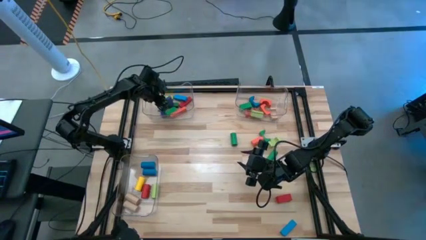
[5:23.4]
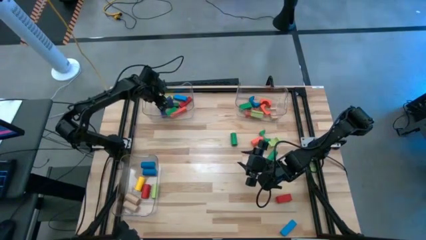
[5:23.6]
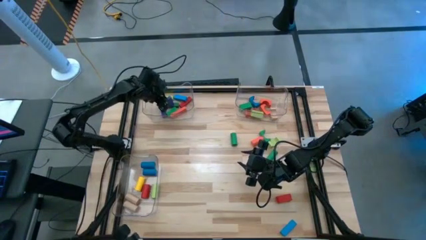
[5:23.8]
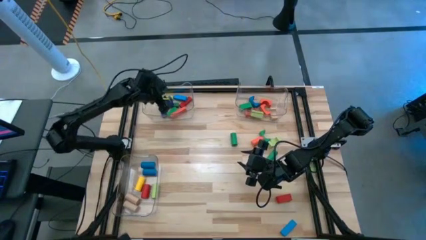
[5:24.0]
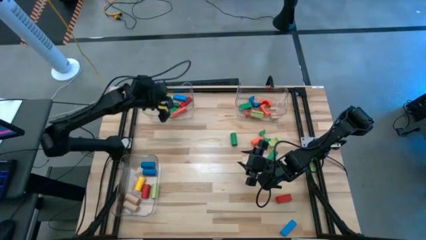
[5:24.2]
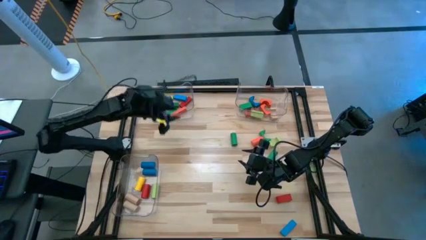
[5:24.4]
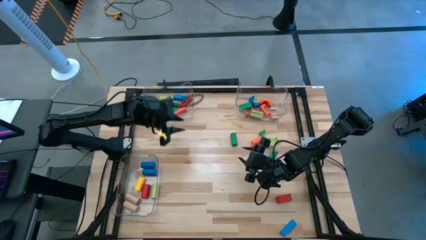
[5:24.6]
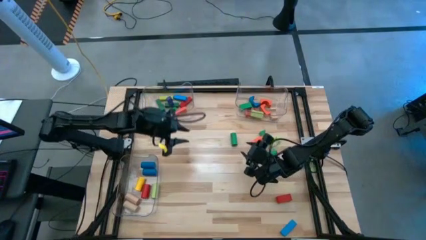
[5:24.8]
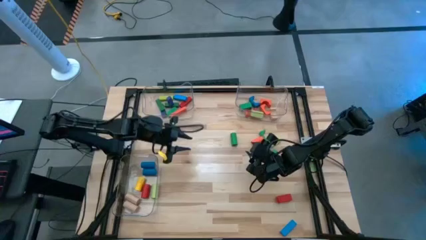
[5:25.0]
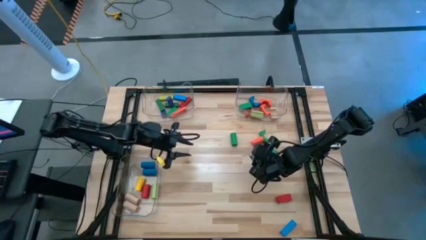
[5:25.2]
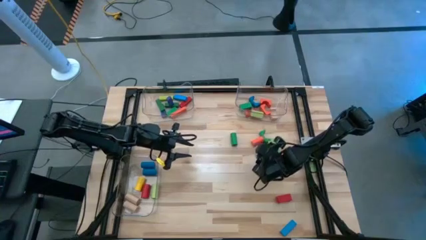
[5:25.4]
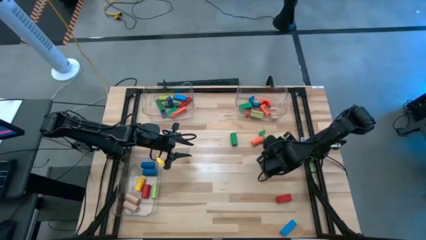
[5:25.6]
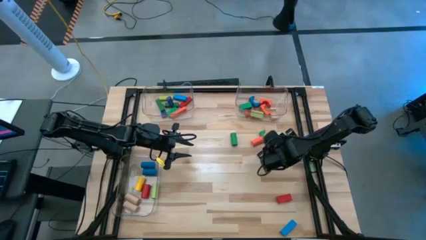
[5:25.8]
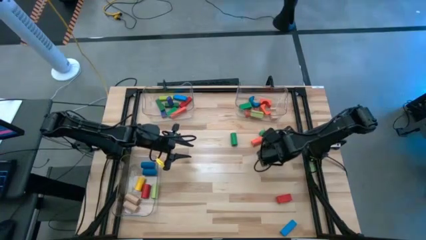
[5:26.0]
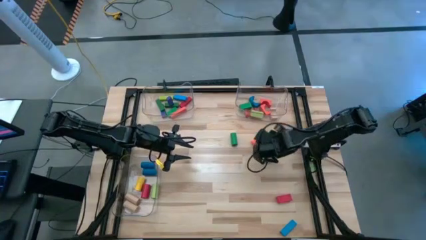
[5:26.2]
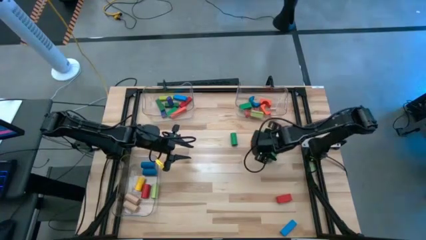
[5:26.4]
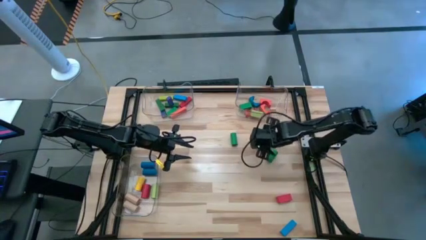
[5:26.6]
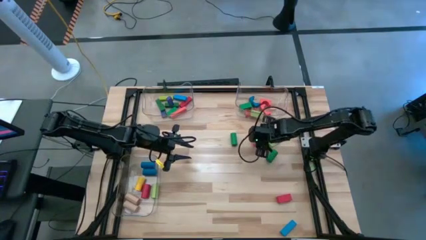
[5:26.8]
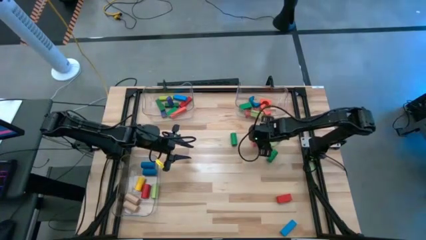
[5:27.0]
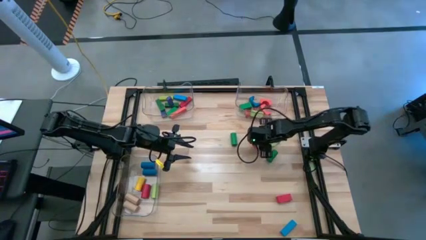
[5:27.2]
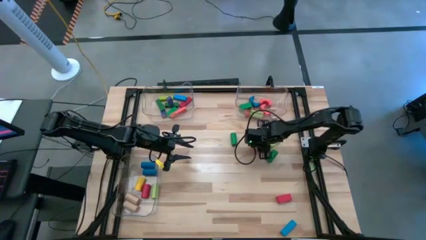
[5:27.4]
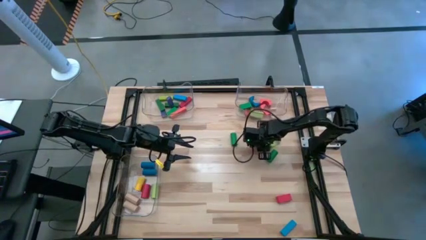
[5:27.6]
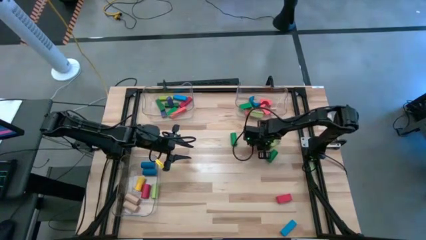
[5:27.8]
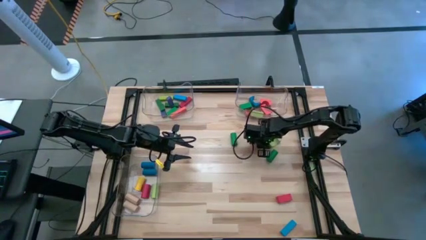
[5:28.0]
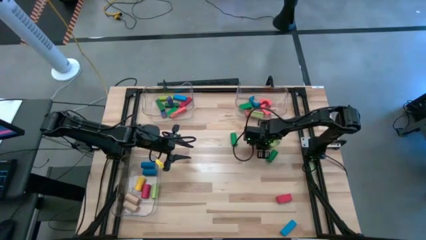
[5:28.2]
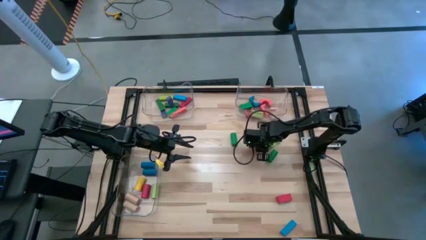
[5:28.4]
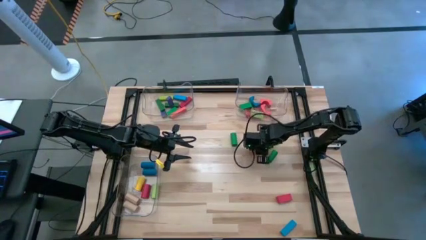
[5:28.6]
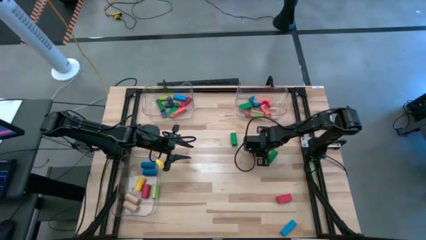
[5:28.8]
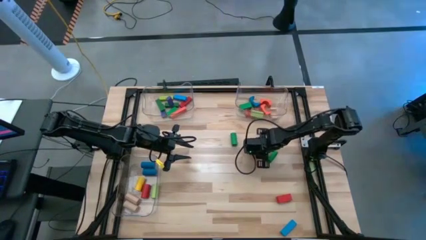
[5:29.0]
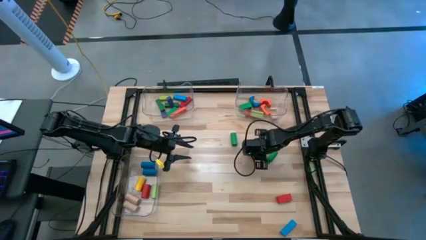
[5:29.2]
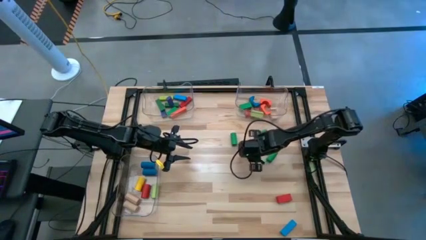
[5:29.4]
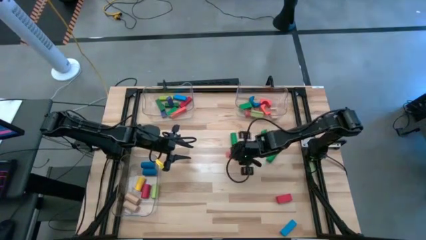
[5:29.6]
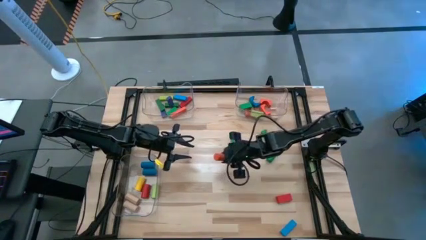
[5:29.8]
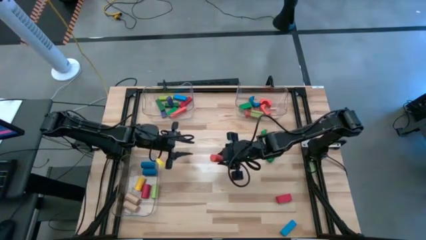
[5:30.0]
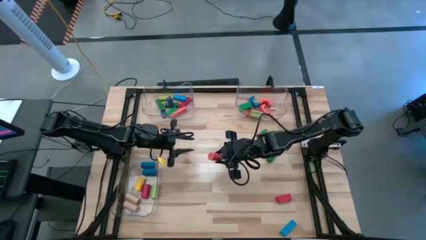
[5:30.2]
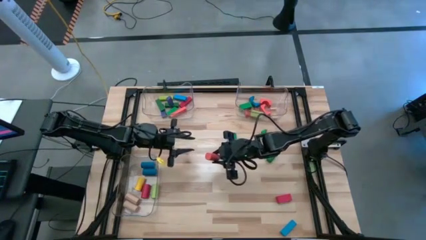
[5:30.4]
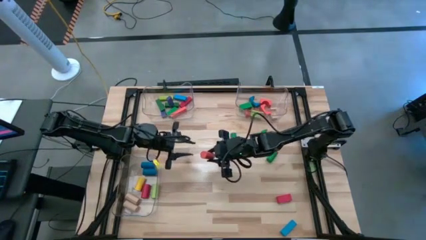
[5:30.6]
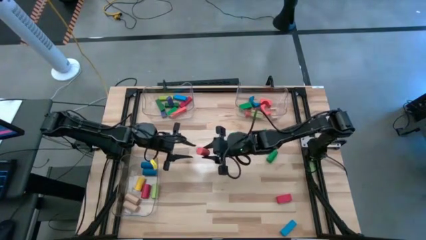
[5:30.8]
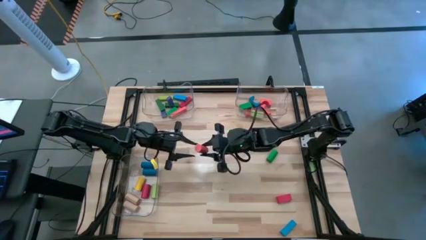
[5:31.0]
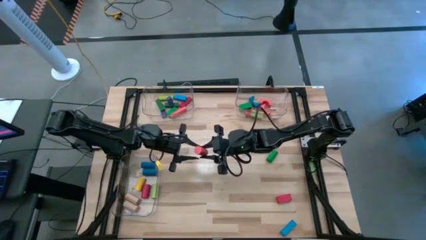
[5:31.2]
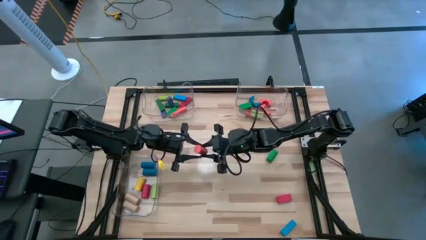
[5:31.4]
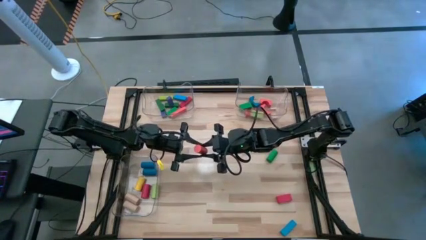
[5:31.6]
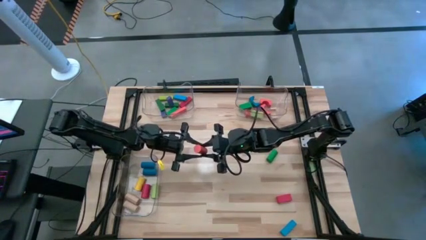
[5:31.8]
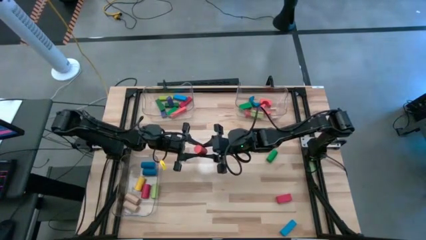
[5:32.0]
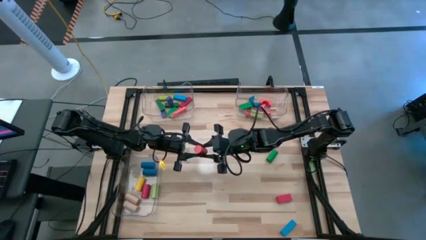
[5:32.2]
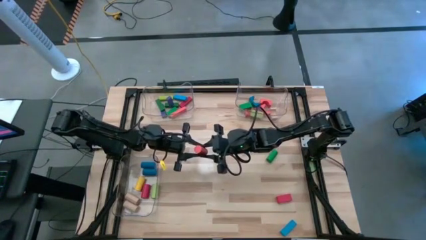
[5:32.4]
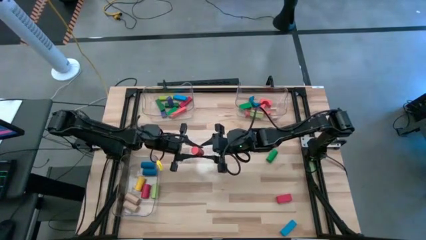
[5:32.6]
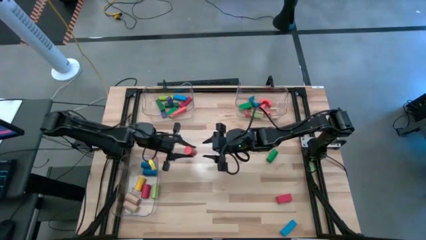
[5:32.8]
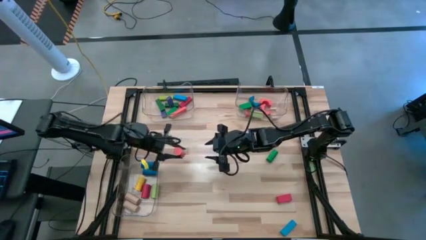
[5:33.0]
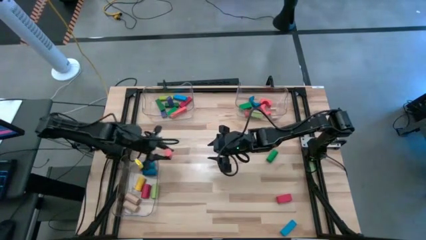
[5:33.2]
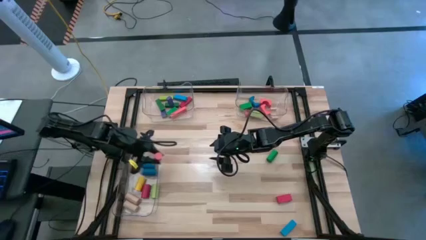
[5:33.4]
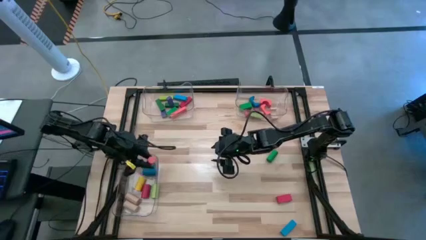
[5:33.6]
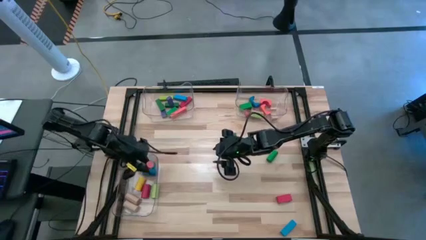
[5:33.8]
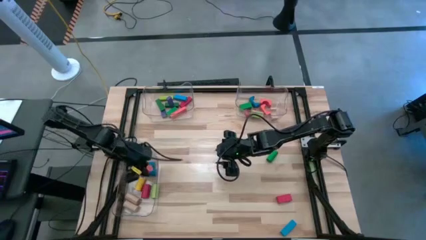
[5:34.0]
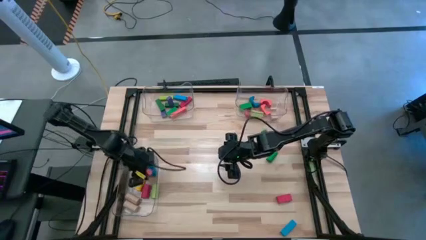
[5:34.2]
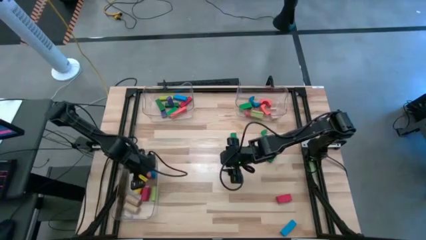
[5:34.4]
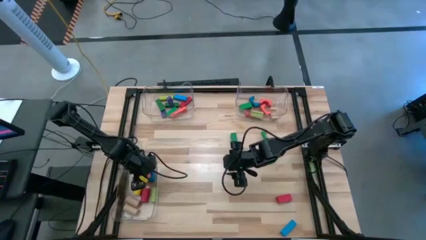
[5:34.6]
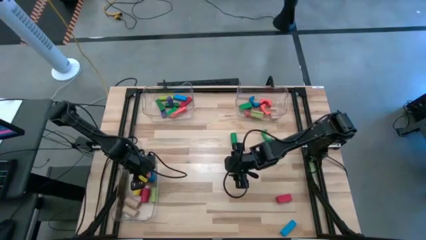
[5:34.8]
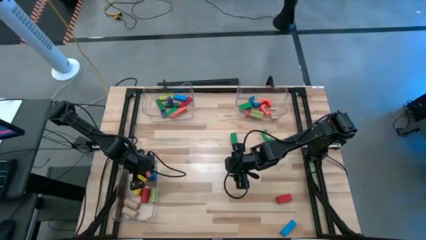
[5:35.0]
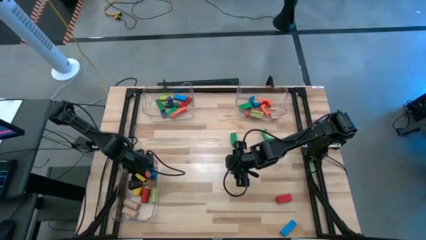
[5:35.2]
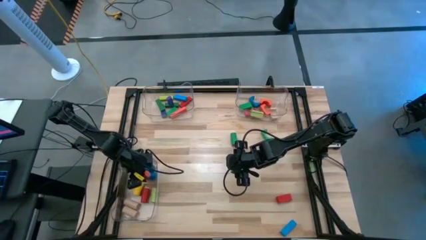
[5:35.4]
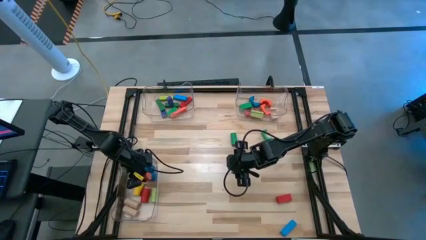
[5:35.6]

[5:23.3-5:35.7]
Task: Sort blocks by size
Put the orange cylindrical block into the bottom left transparent bin

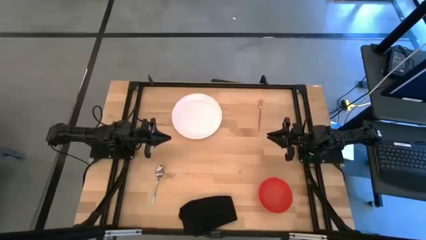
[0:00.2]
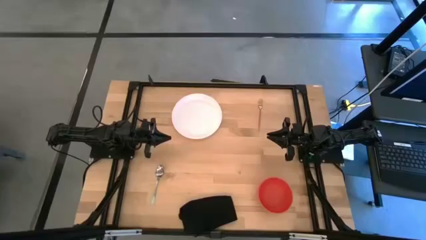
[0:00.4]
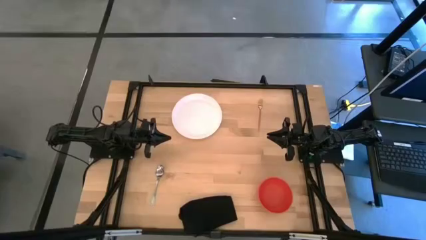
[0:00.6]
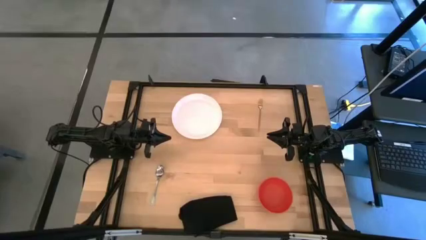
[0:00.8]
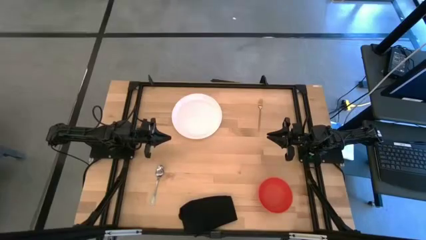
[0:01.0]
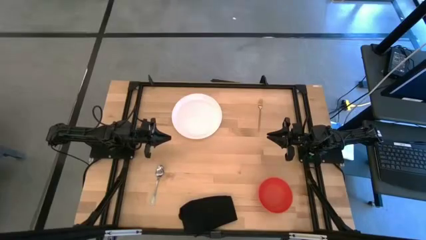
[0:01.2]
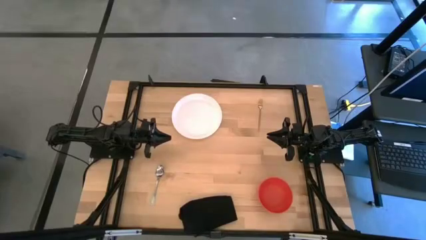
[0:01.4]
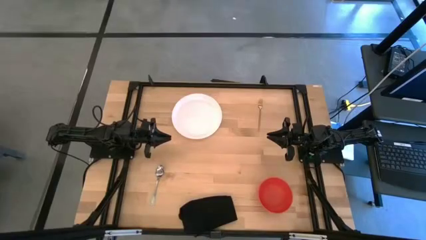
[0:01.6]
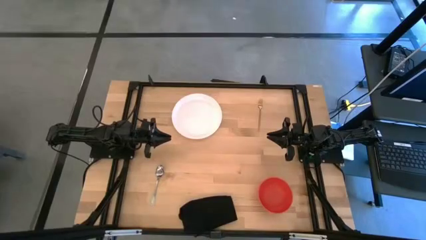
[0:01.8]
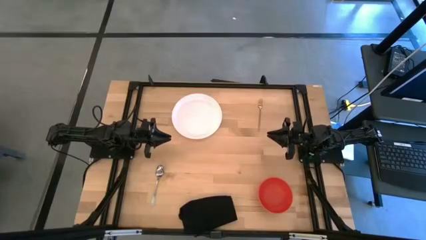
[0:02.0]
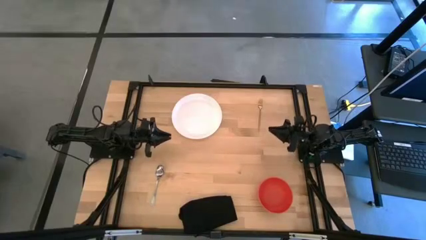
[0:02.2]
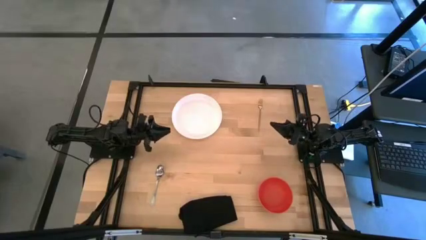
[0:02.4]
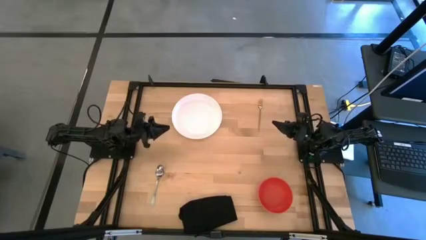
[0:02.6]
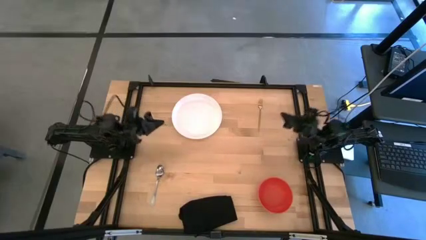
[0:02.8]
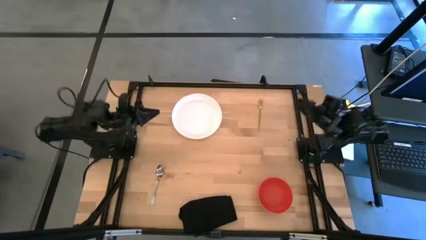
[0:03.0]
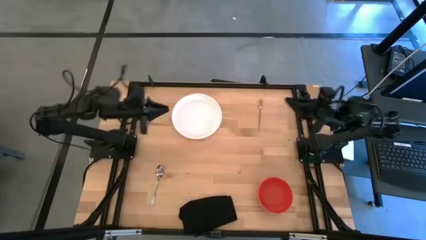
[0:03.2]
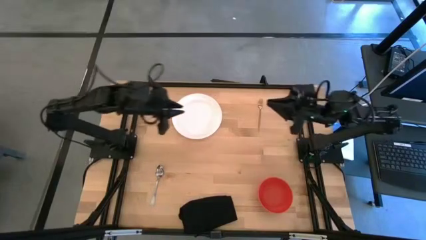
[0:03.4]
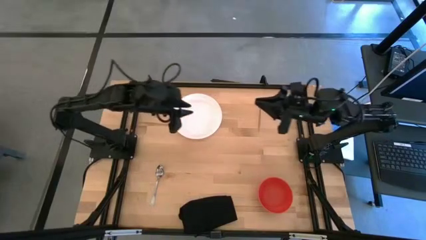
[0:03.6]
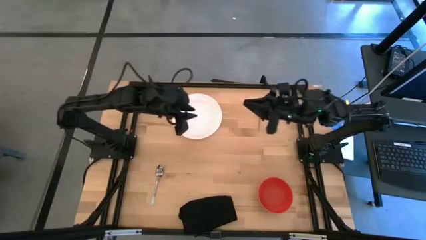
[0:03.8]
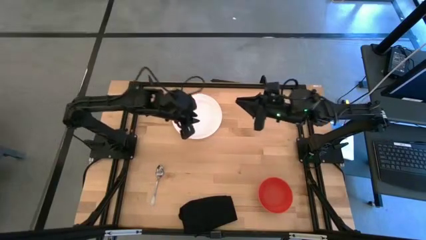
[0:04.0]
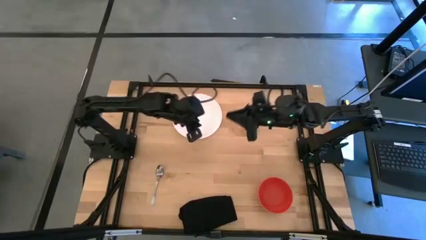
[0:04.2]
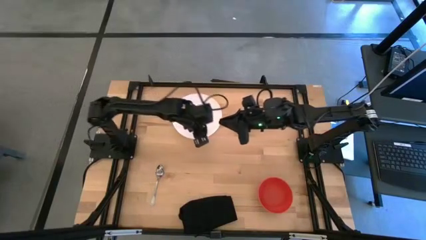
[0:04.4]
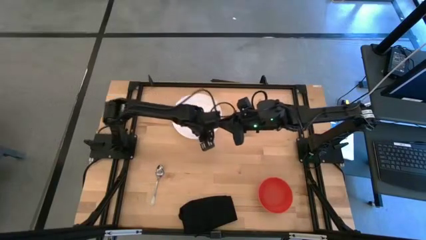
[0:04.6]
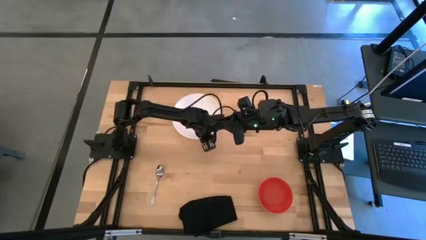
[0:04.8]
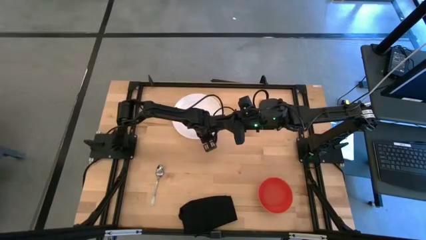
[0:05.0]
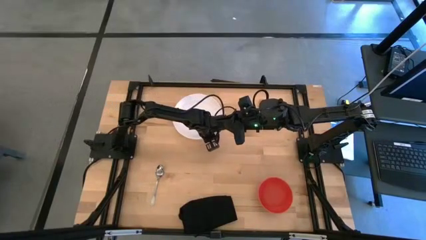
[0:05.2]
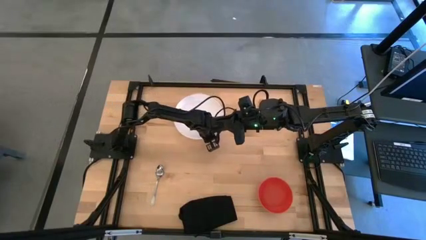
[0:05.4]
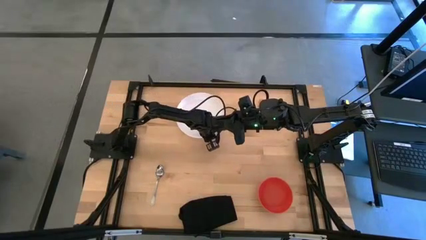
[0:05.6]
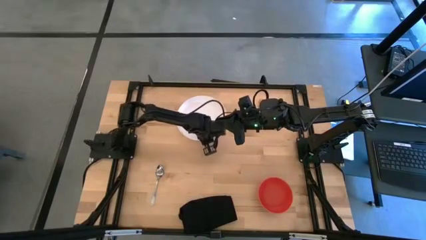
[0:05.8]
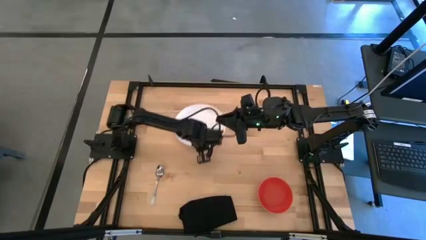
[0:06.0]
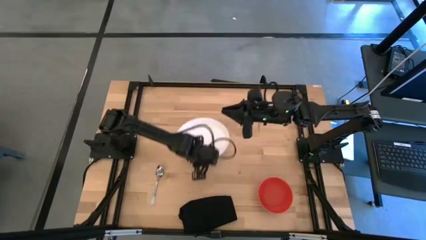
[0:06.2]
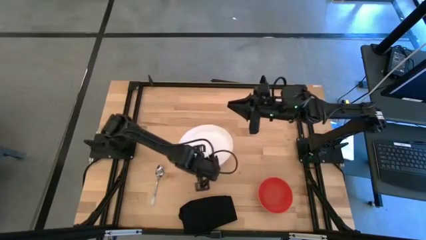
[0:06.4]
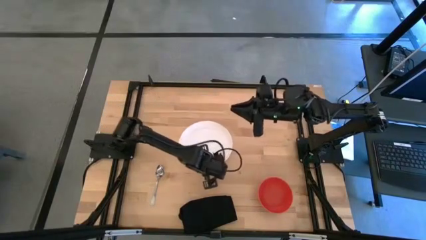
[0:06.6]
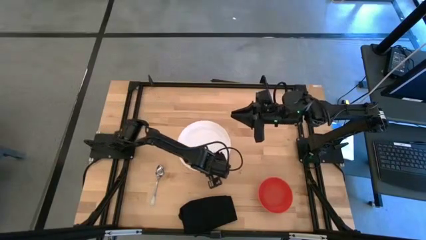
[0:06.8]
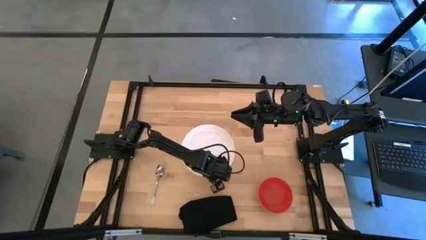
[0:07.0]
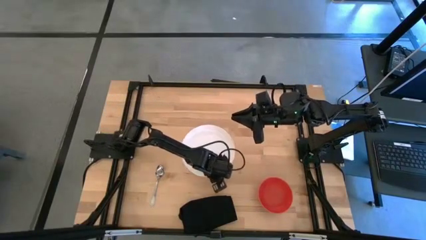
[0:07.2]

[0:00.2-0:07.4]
Task: Set table place
Move the white plate to the center of the table
